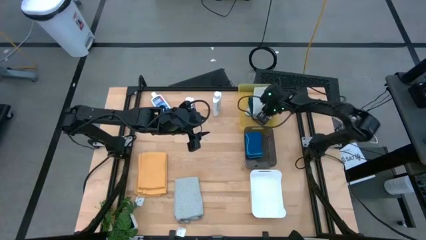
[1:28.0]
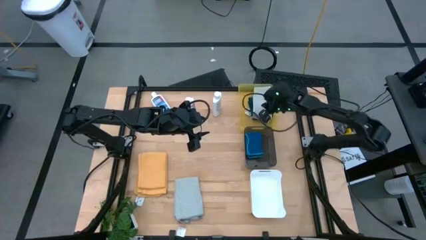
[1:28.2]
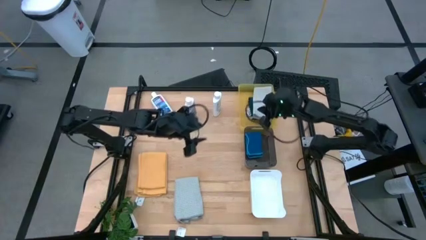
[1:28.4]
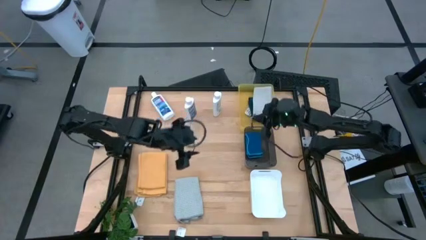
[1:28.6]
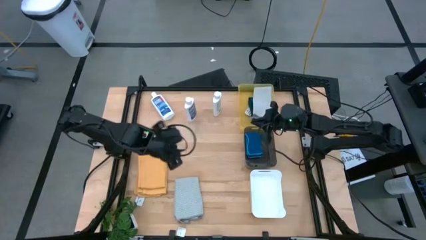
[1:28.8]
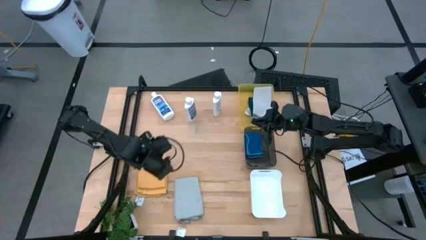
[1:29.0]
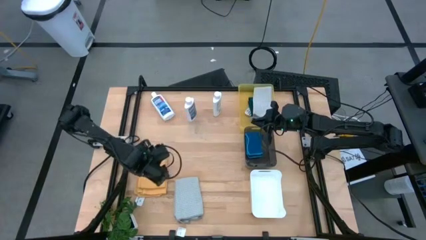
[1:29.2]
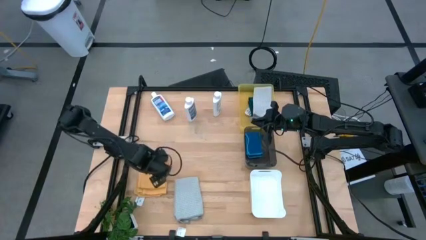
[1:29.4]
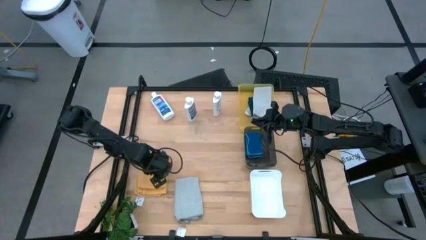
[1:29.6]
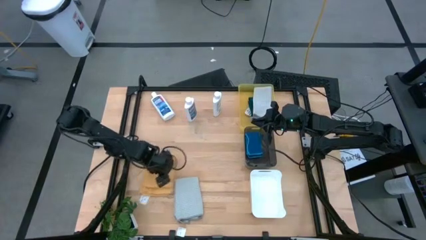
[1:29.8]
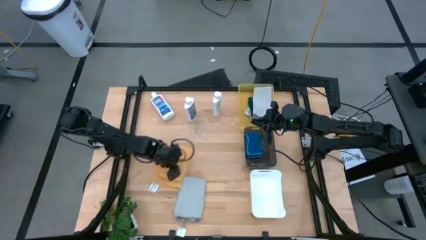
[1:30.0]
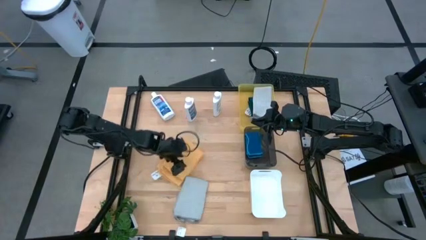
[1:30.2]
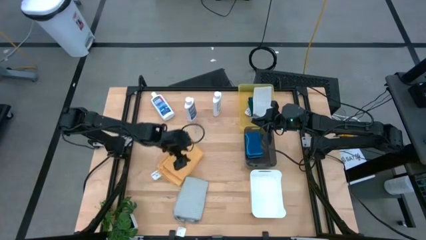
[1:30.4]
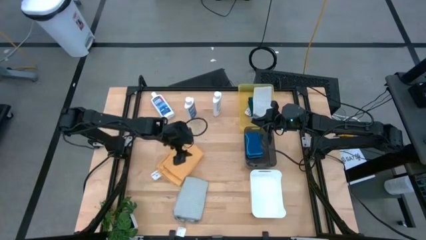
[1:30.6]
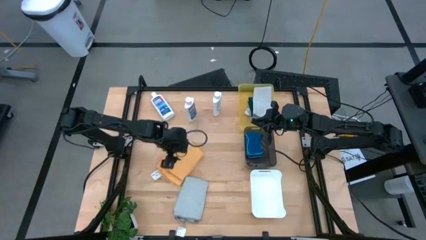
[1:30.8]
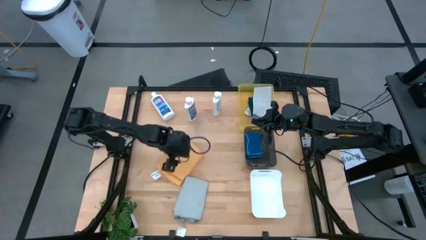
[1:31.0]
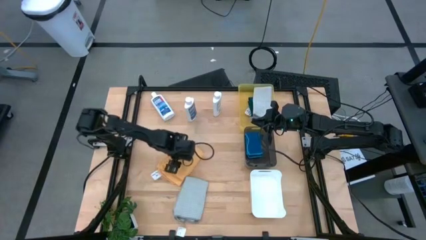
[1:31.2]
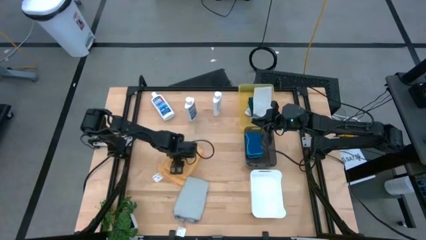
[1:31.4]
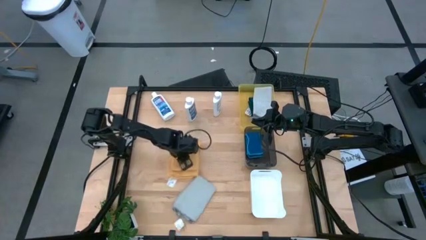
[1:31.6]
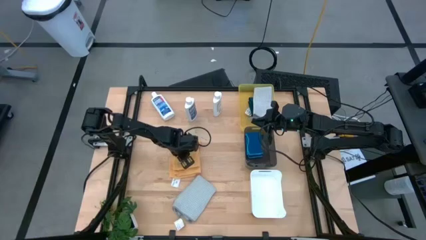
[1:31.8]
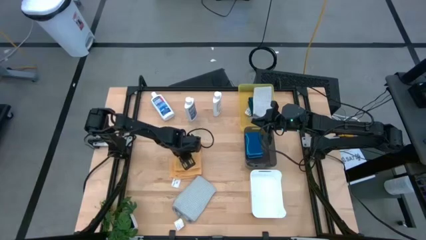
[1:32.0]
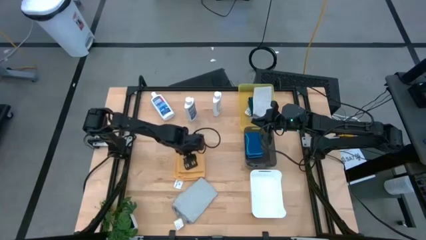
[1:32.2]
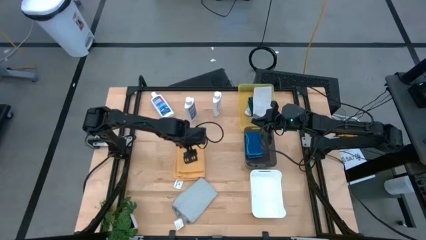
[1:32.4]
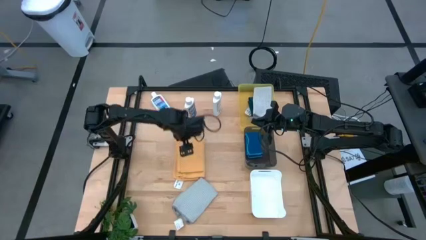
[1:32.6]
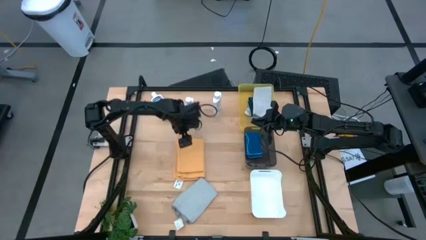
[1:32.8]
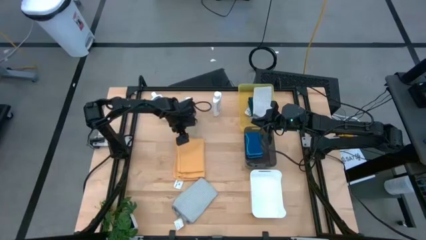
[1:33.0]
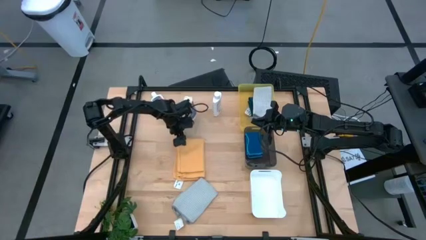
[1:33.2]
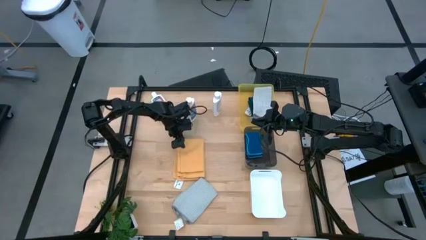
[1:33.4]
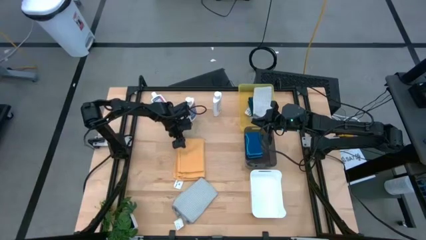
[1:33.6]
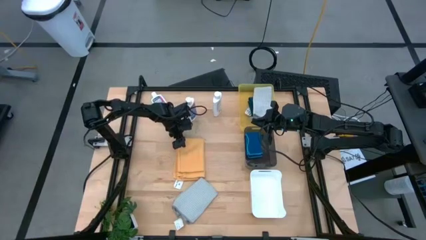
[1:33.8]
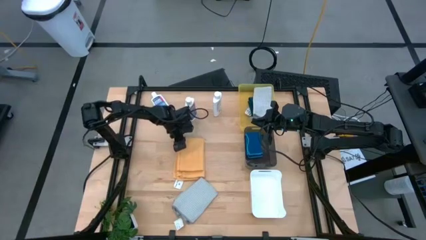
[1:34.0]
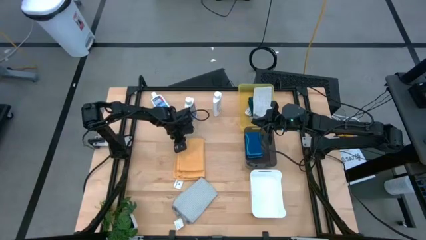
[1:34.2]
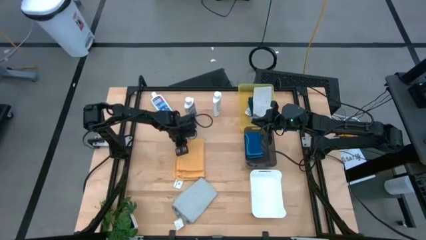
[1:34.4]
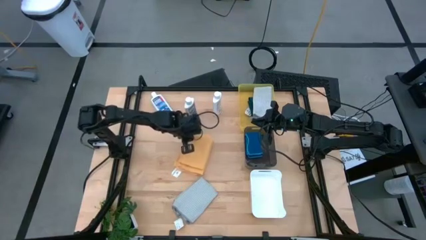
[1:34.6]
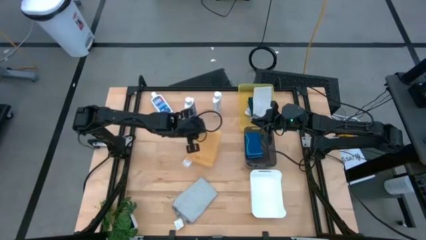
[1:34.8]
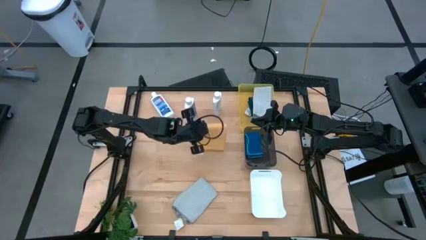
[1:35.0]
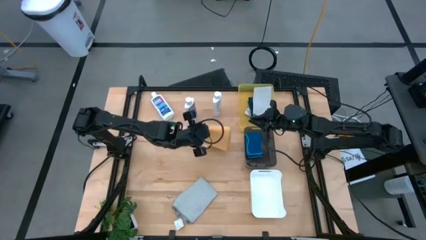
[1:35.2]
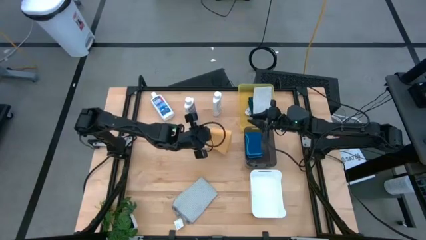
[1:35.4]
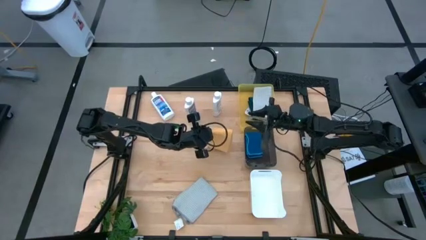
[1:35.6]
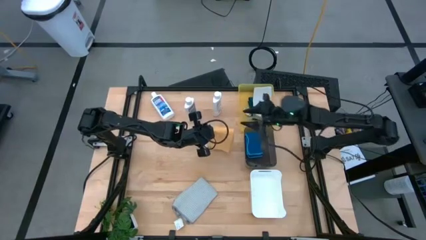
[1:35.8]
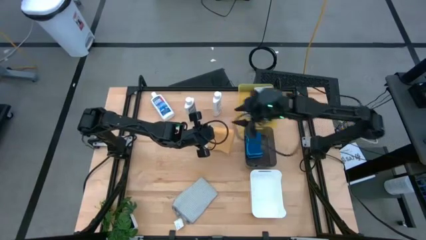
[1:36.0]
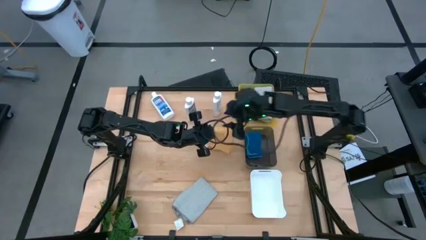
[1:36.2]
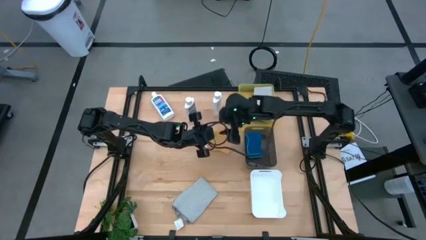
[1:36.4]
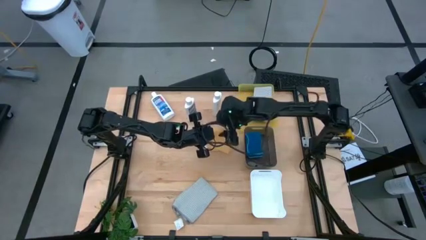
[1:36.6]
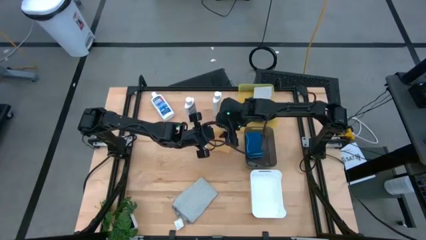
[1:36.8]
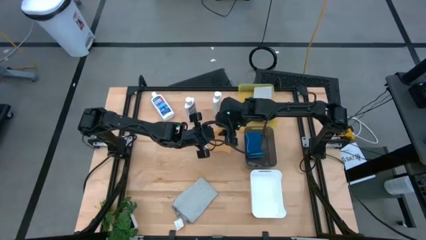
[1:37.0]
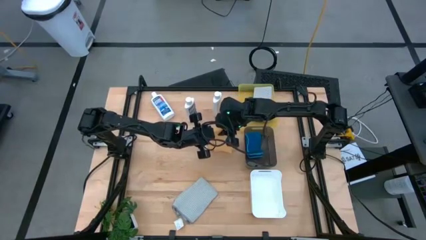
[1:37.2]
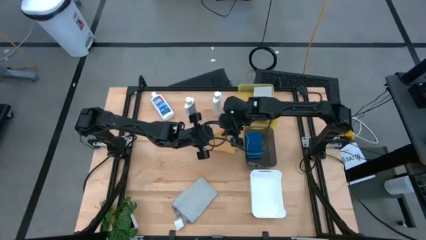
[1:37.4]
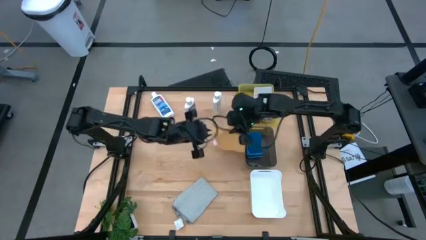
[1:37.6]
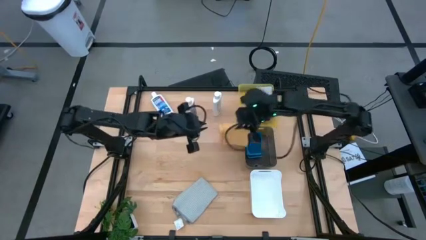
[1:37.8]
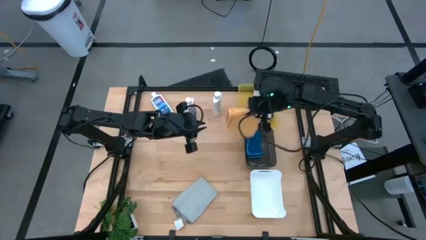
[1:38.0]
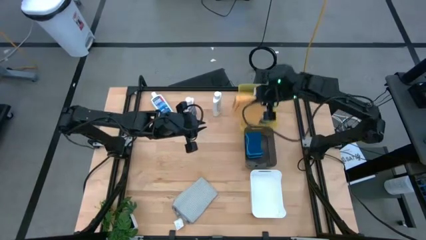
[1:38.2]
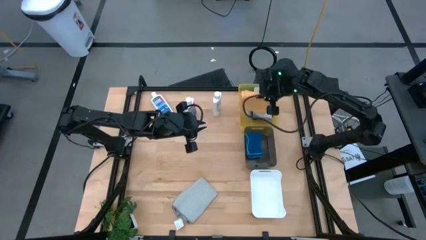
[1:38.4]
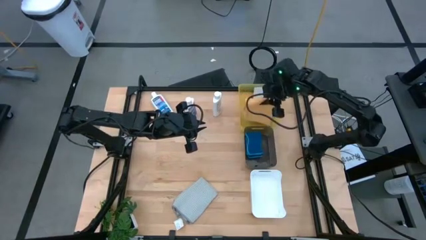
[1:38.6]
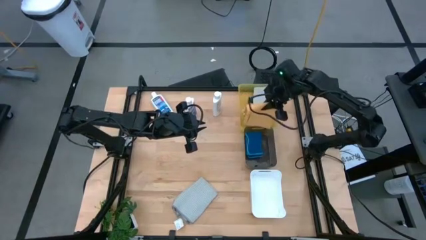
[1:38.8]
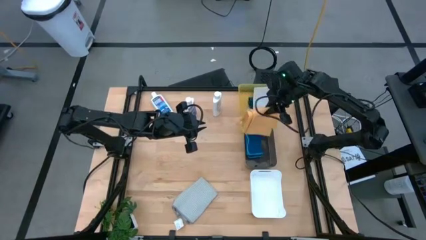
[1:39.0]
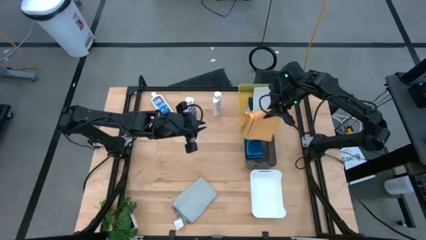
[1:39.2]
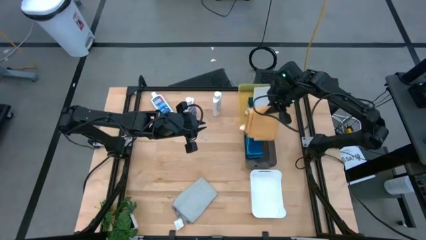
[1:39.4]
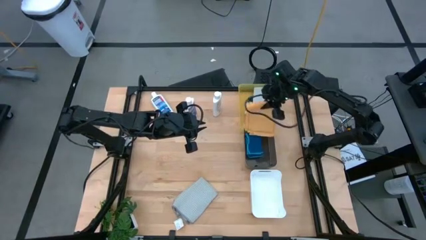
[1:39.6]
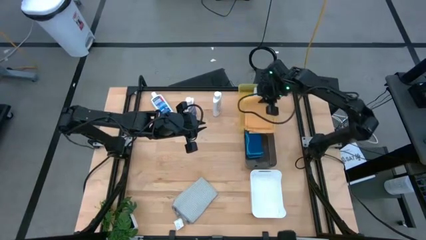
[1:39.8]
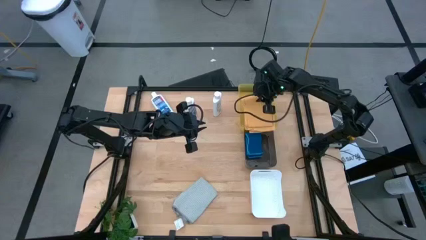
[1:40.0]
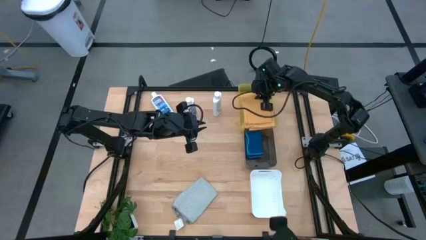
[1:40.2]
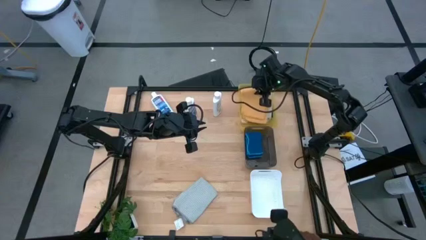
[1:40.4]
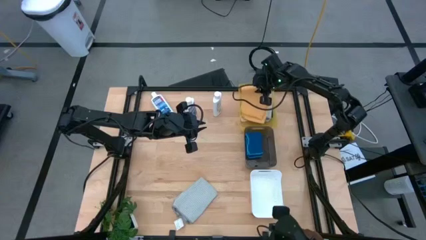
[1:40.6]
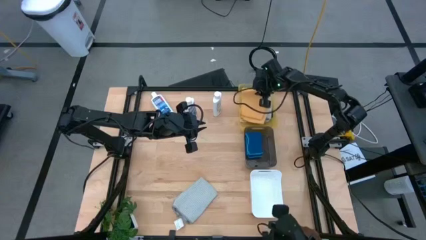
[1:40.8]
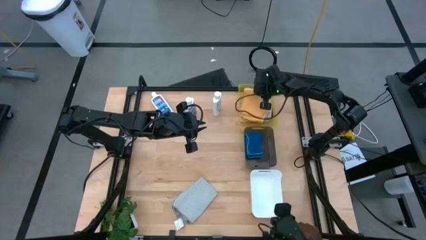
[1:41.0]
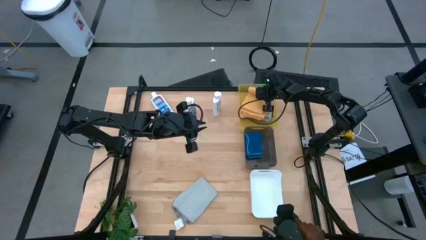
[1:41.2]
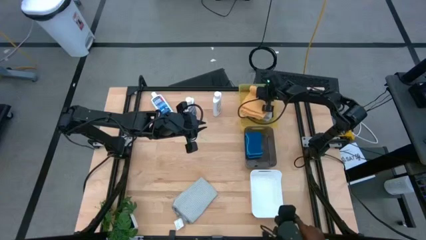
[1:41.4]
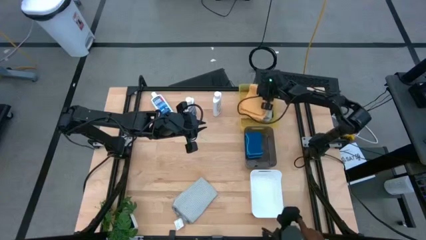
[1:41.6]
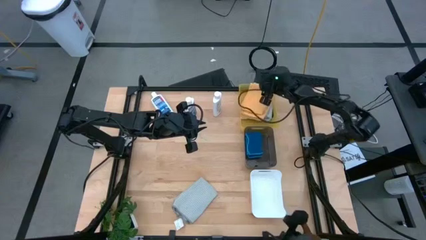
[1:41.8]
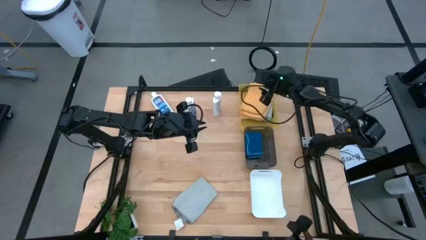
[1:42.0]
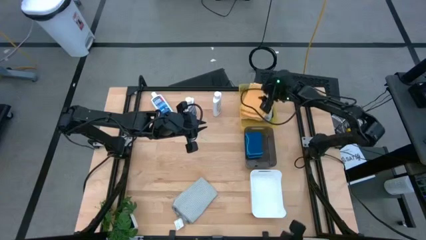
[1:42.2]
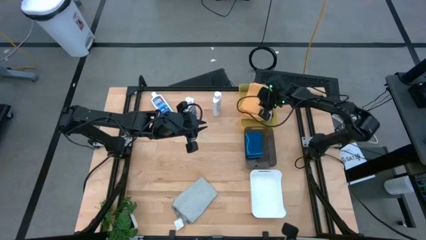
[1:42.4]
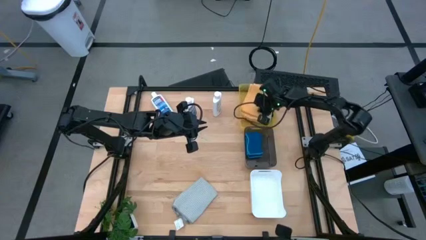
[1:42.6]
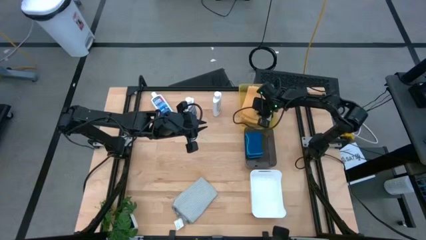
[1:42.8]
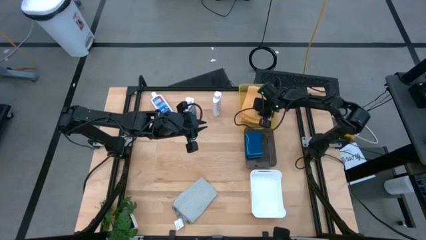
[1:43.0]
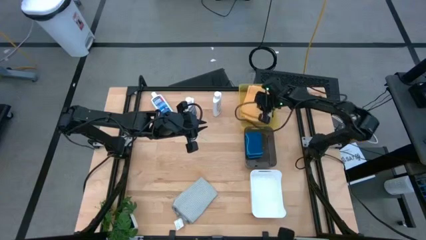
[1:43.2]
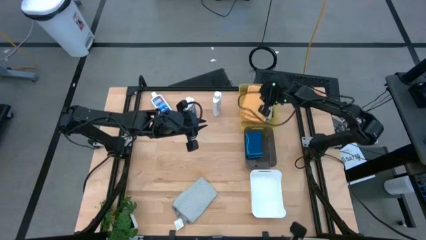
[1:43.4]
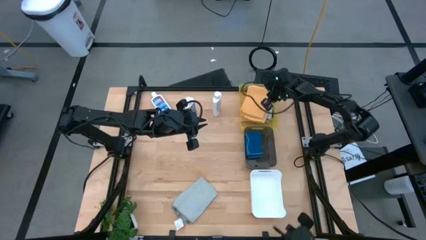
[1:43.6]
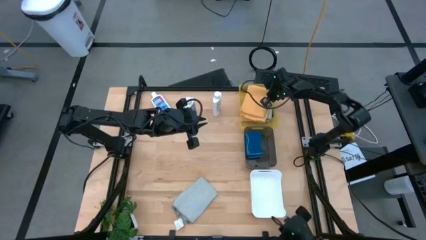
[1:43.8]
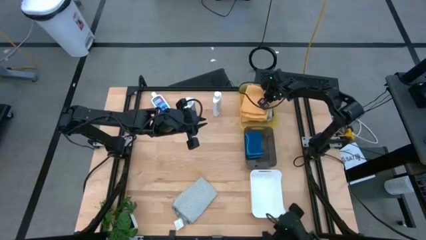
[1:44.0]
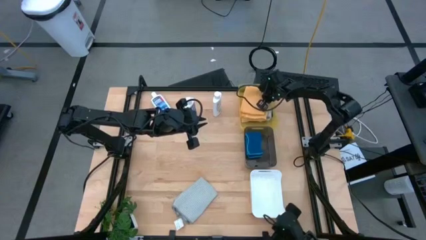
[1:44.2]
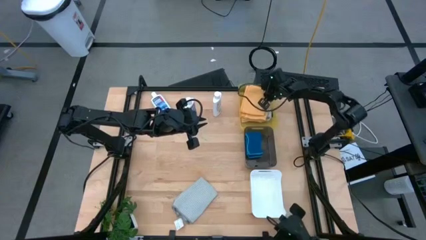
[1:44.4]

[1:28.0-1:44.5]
Task: Pick & Place Kitchen Items
Put the orange towel into the yellow bin
